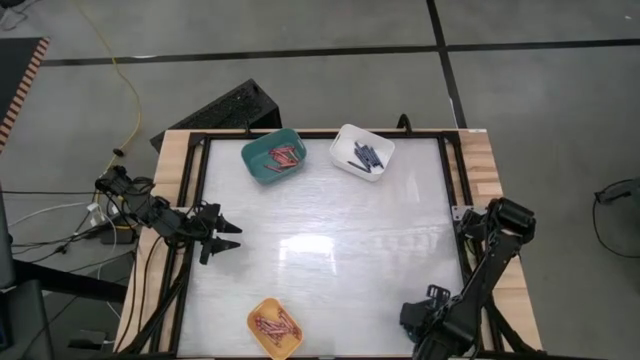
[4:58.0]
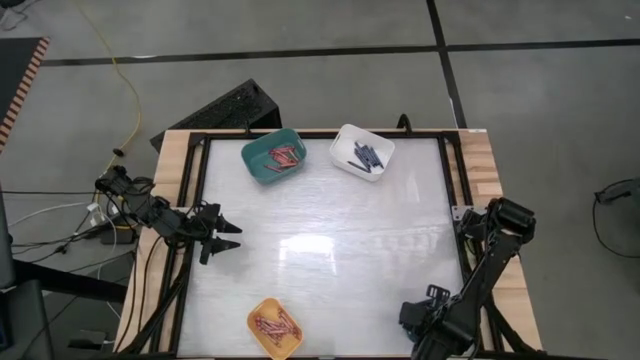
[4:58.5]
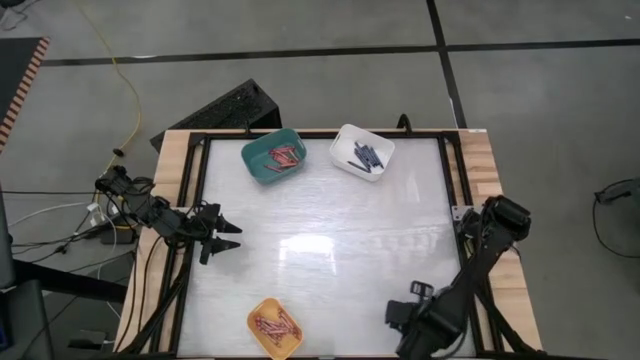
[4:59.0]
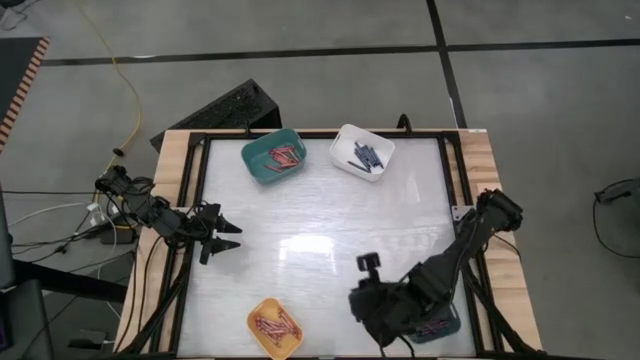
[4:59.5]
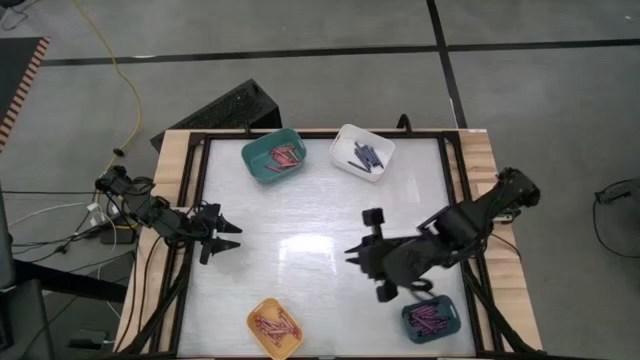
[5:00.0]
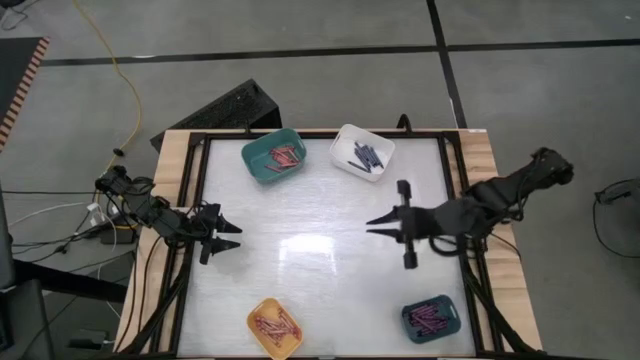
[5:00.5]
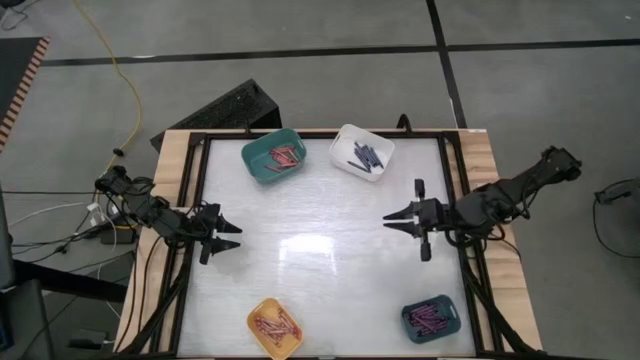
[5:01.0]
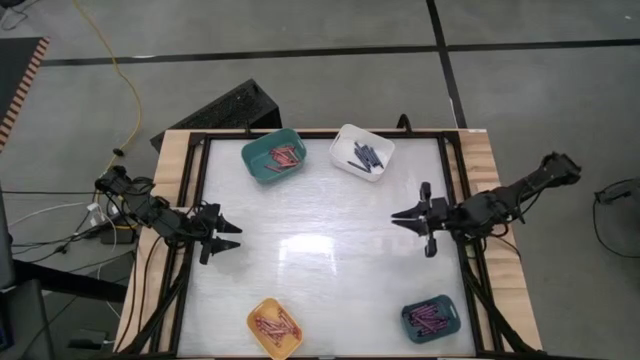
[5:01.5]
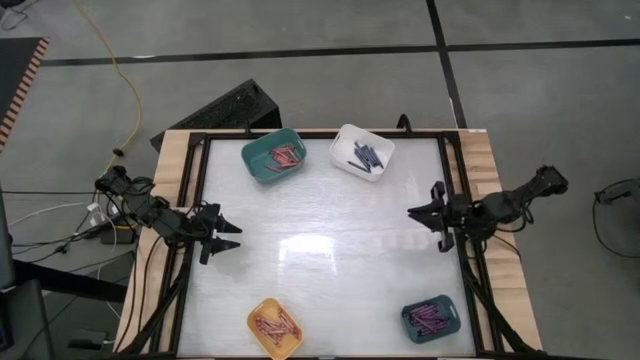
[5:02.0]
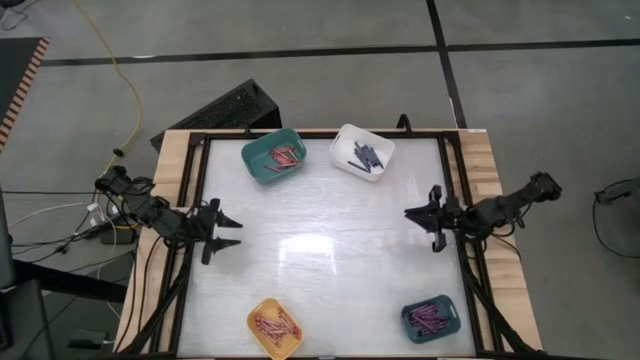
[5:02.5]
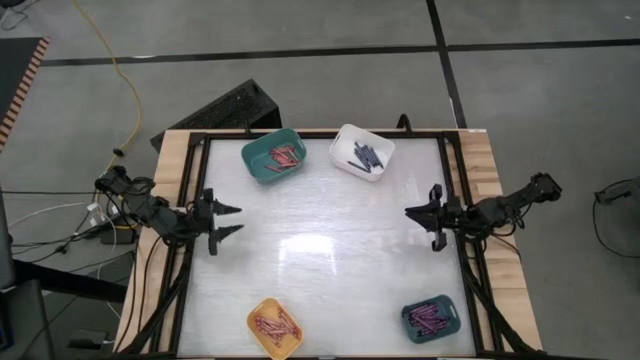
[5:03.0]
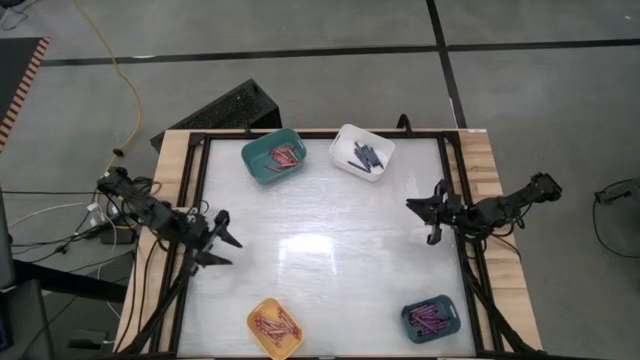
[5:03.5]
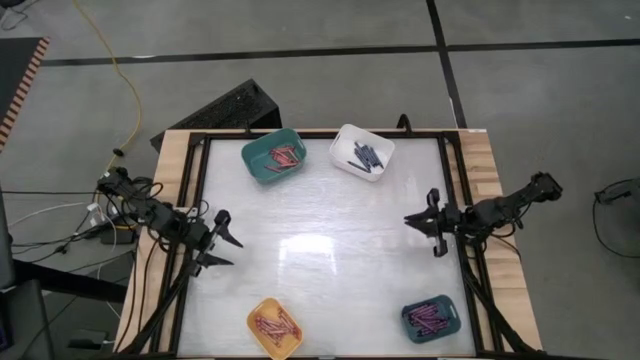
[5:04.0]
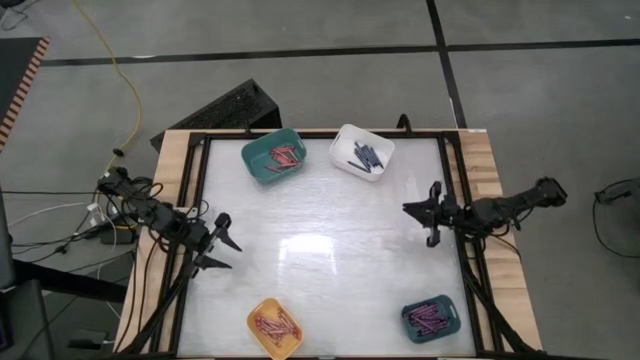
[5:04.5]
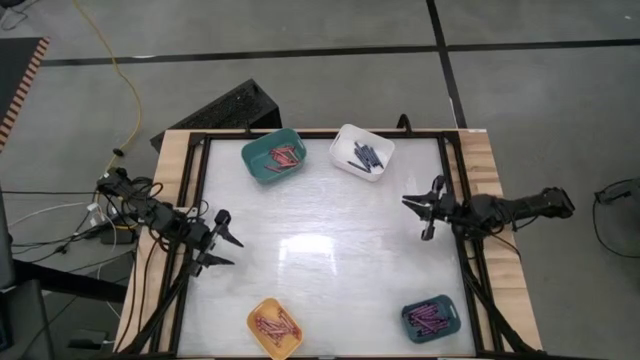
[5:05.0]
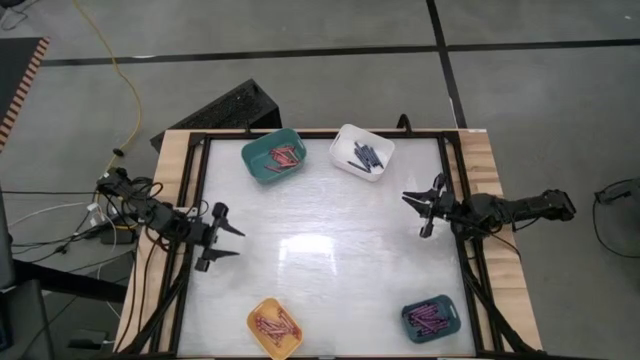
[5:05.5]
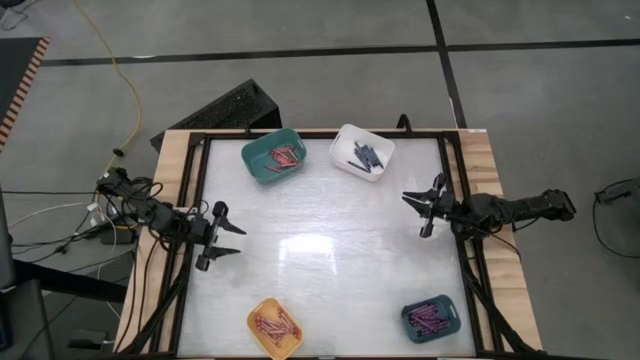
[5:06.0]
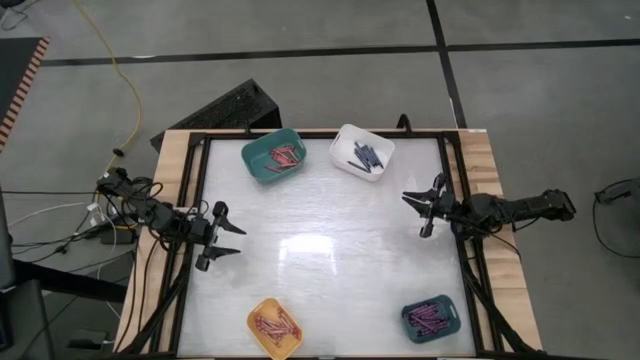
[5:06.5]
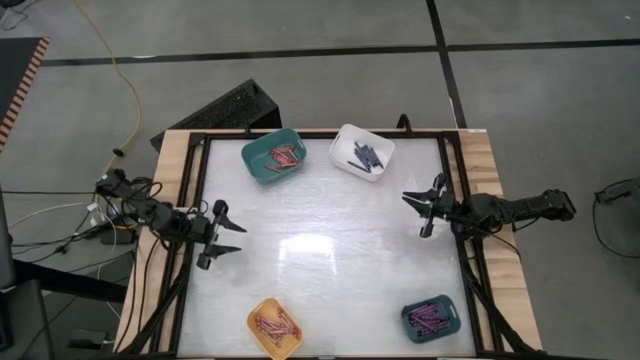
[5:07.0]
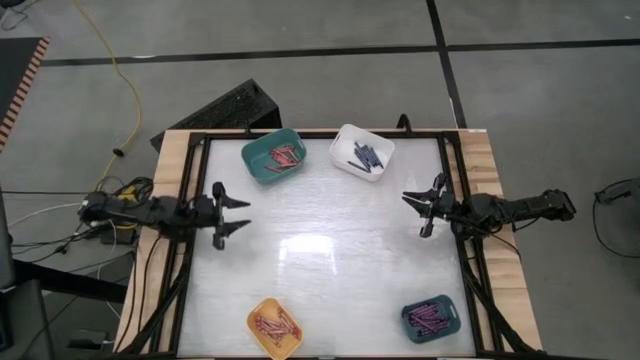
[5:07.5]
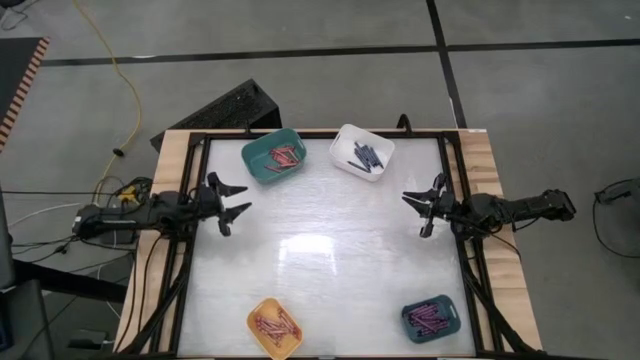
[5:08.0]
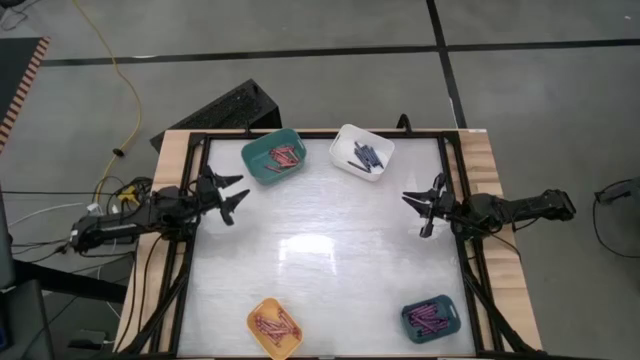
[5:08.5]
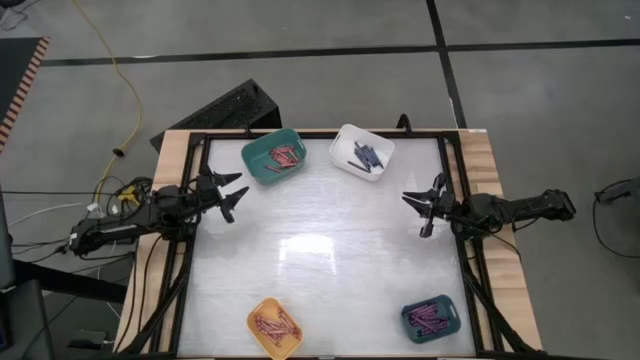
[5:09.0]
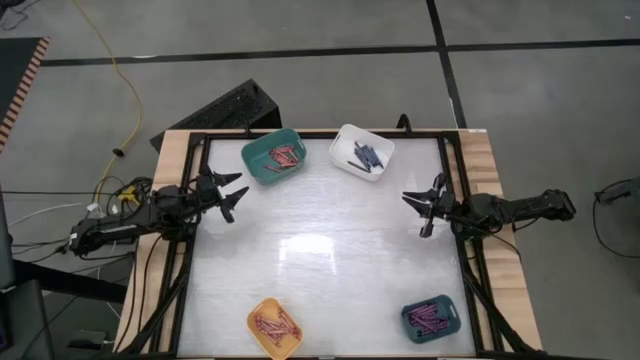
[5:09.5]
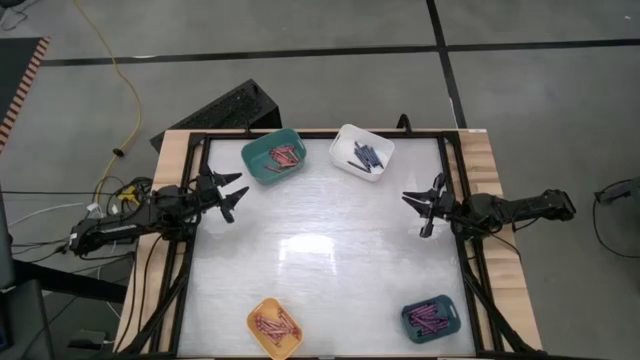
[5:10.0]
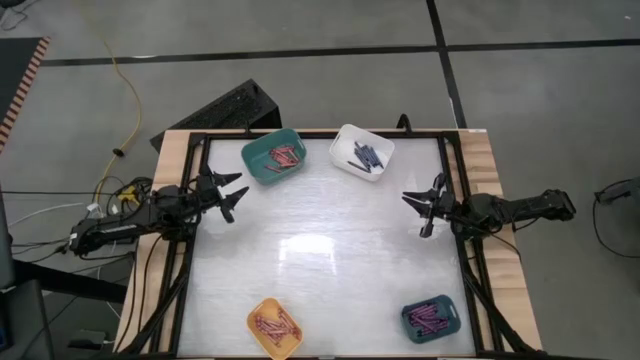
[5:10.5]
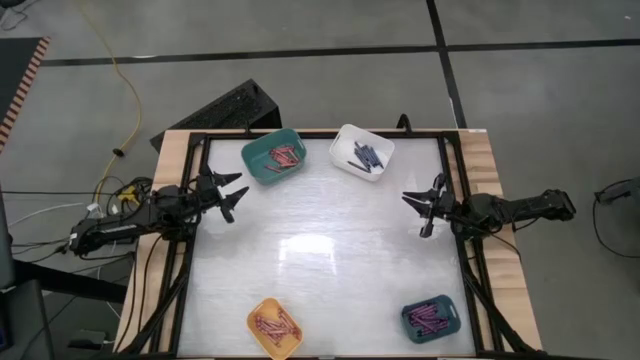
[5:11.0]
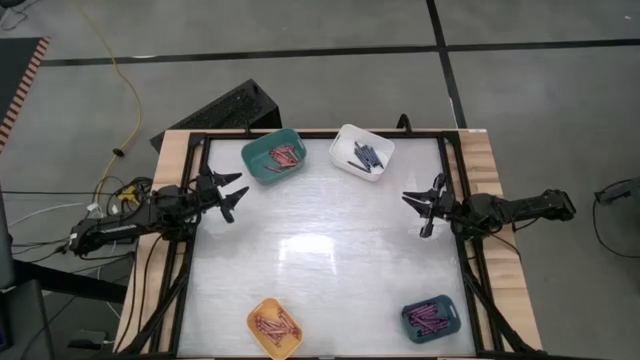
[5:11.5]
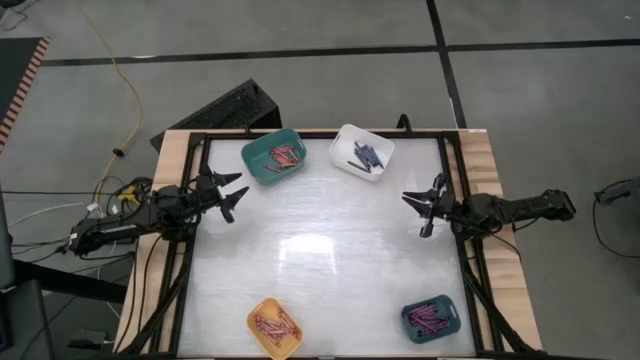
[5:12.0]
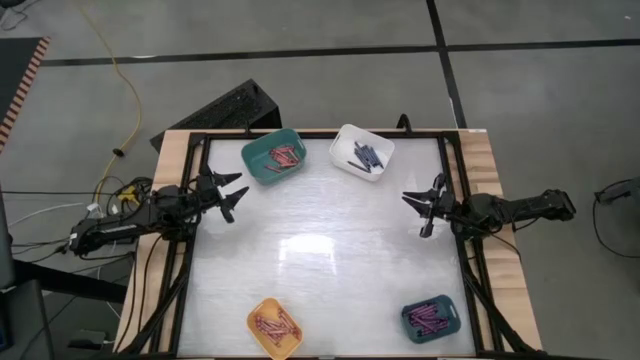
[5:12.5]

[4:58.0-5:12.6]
Task: Sort crayons
Return to Home Position

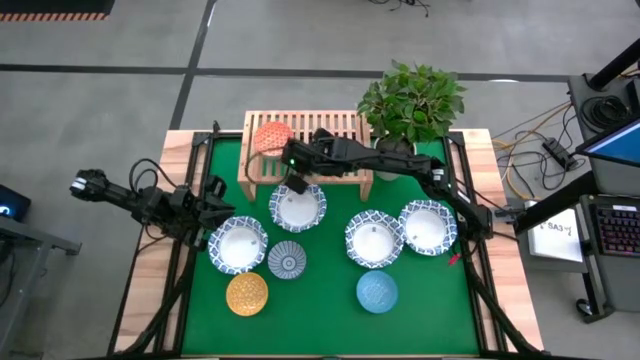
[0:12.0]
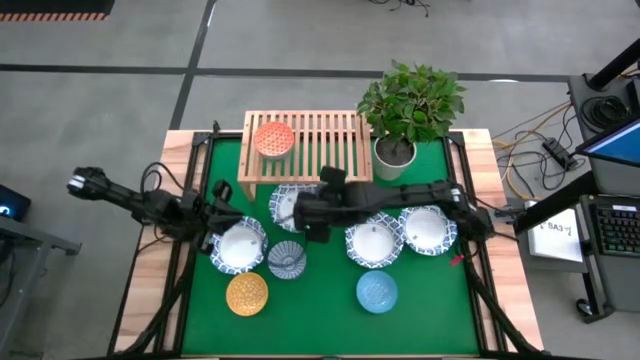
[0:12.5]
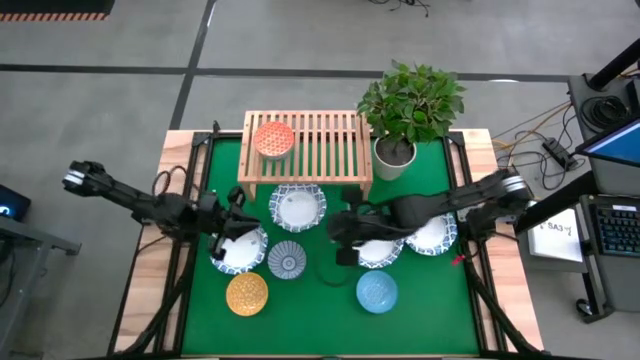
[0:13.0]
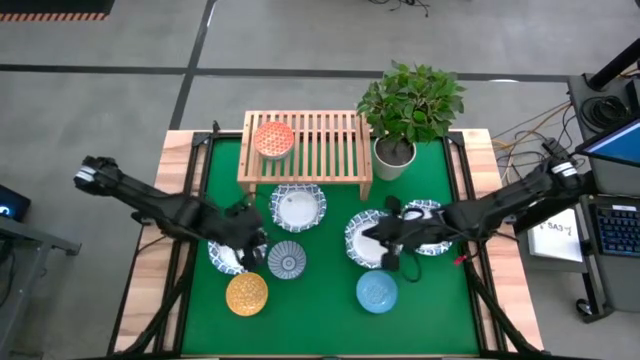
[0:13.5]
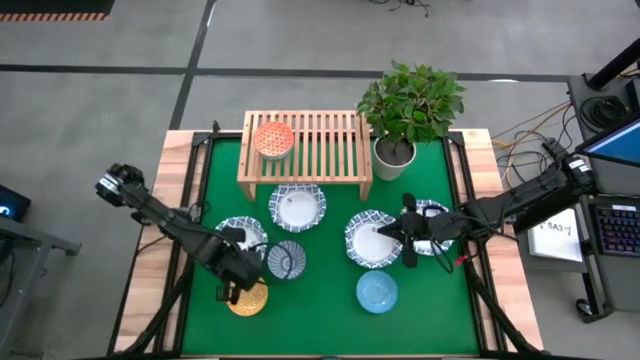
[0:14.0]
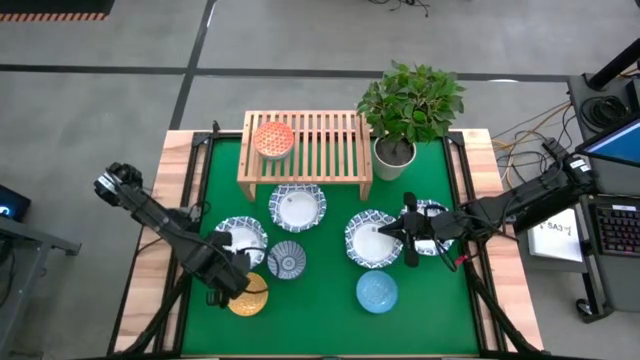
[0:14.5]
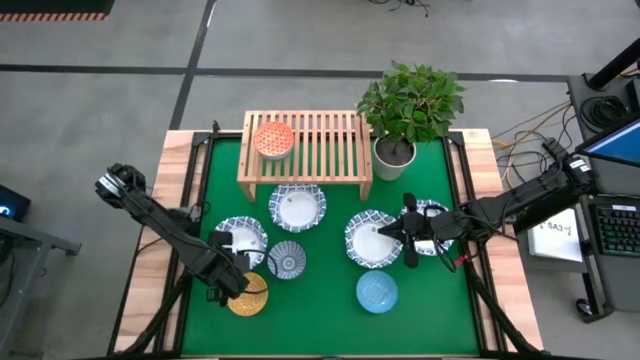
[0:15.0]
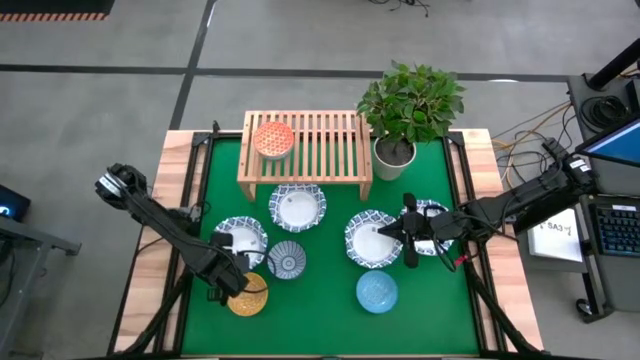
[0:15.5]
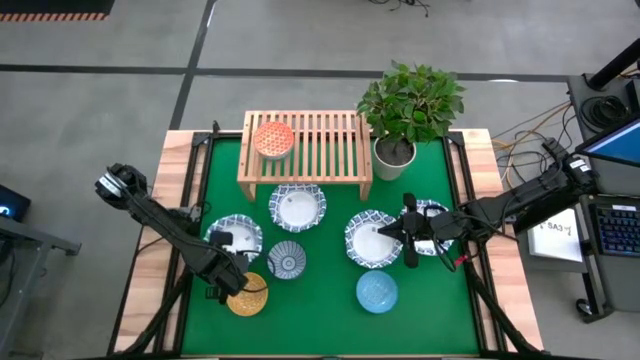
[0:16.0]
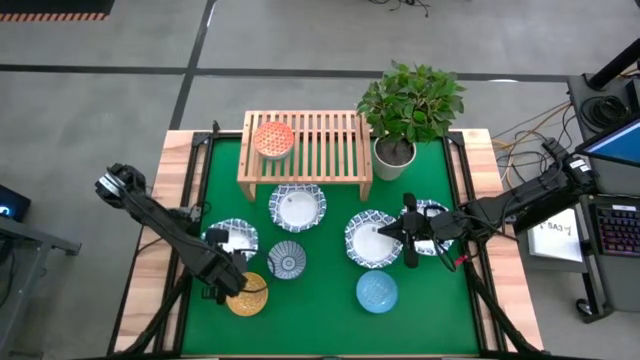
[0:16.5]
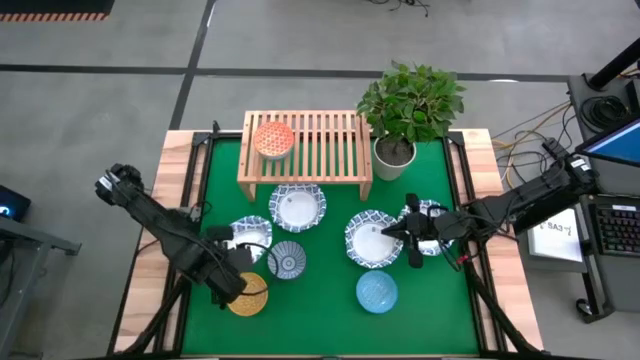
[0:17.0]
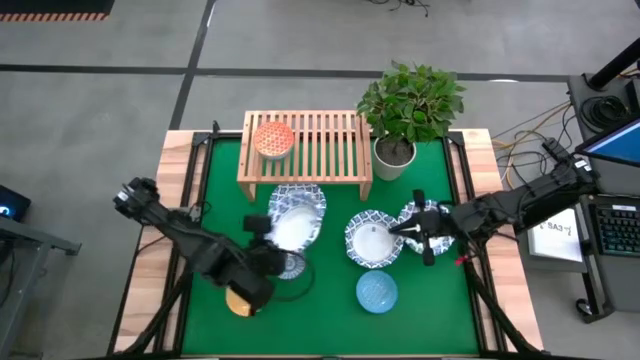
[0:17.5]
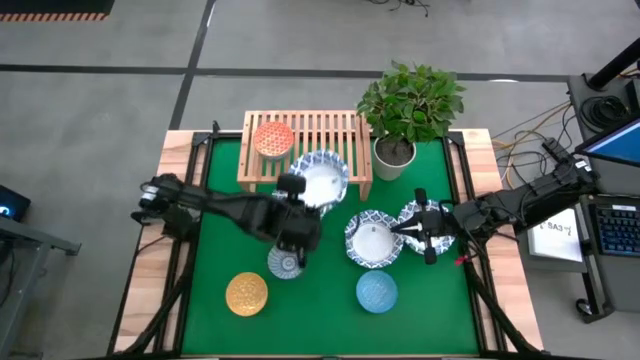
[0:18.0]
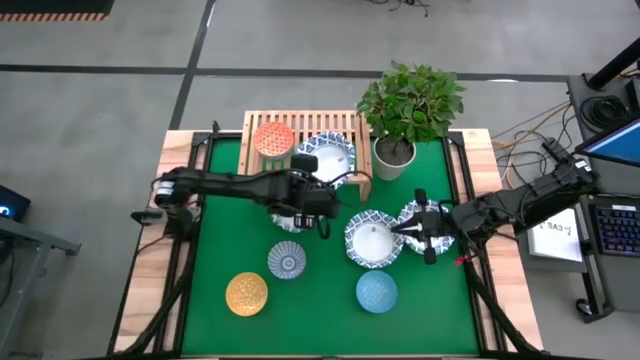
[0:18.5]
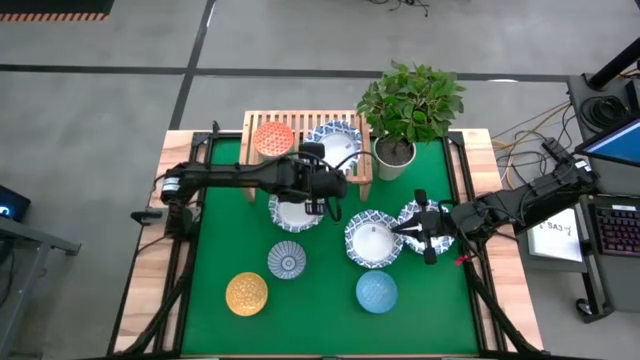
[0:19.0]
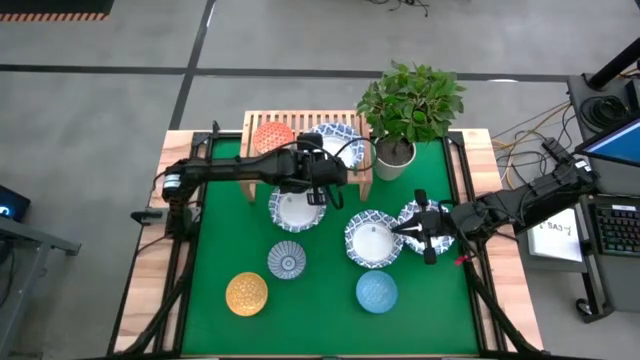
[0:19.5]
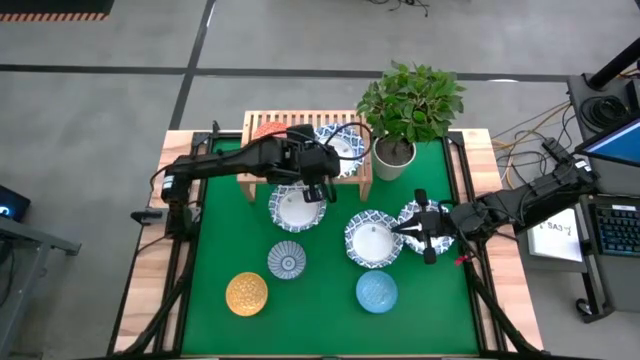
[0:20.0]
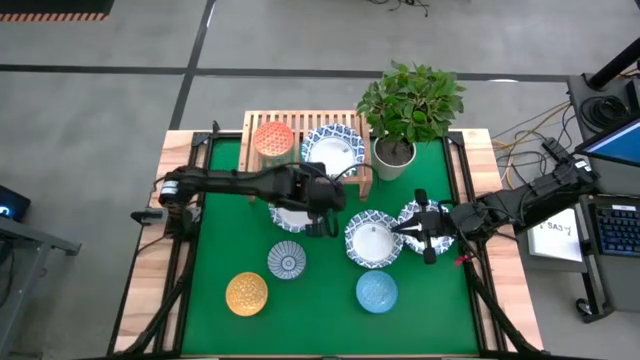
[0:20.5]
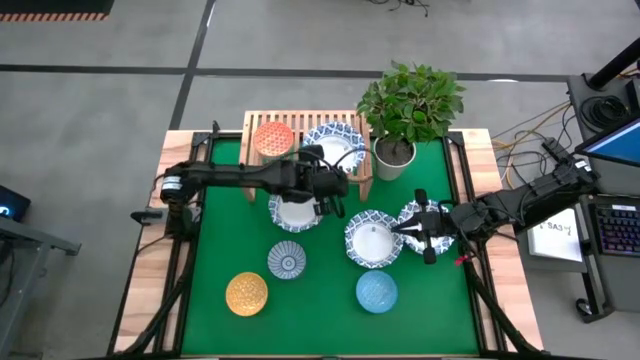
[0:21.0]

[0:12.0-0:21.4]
Task: Place and stack plates onto a shelf
Put the middle left white and blue plate on the right side of the shelf
